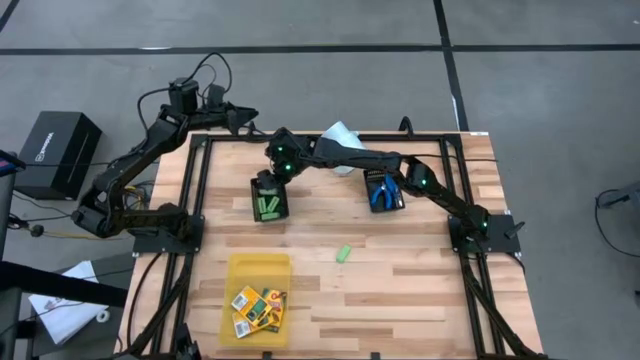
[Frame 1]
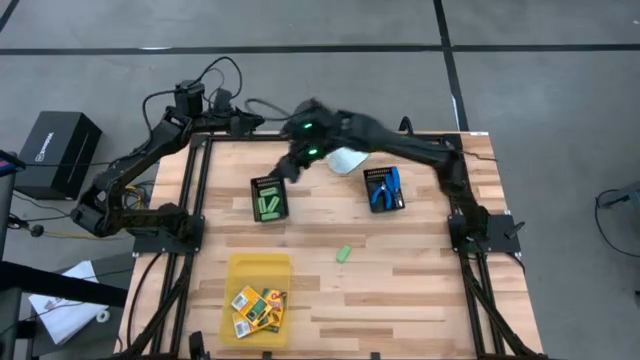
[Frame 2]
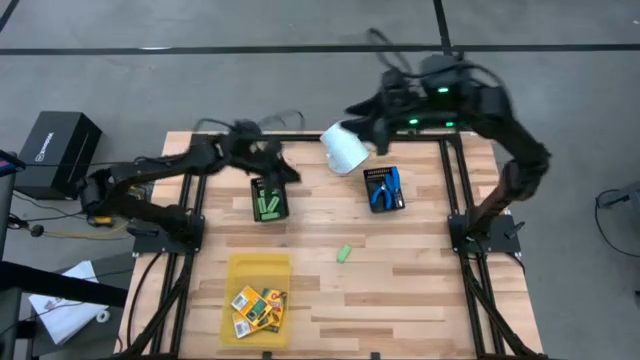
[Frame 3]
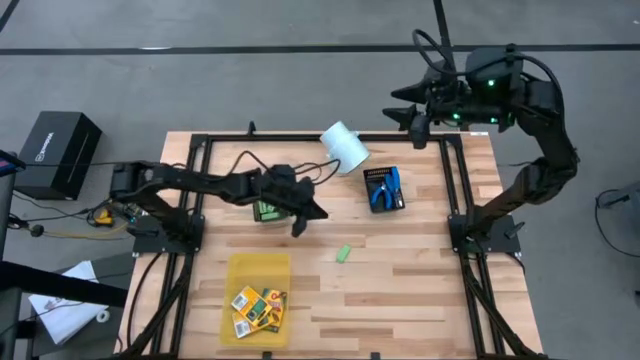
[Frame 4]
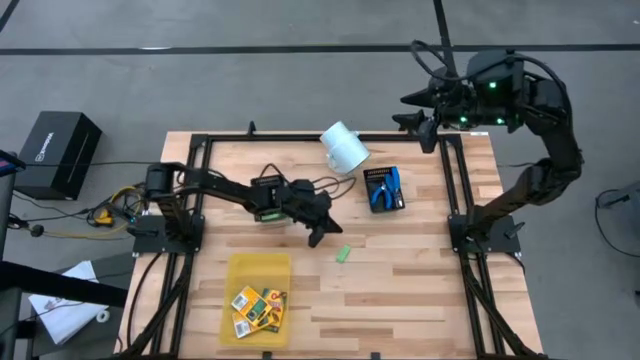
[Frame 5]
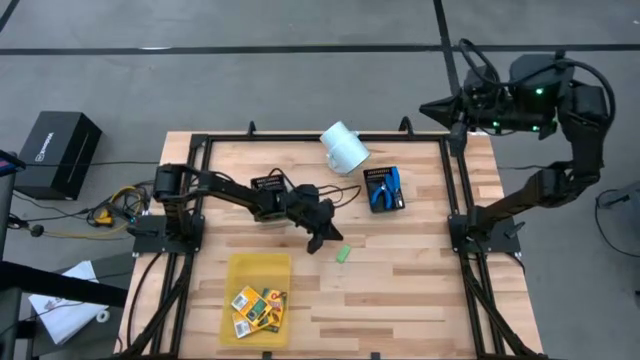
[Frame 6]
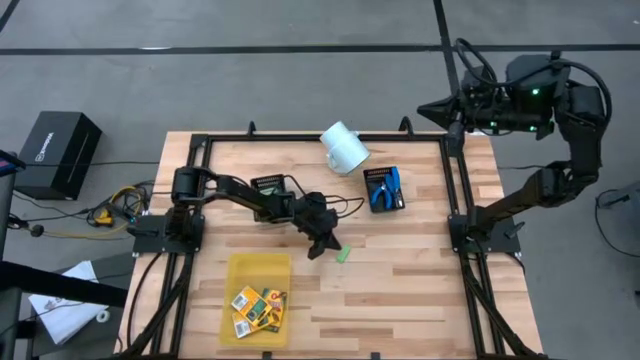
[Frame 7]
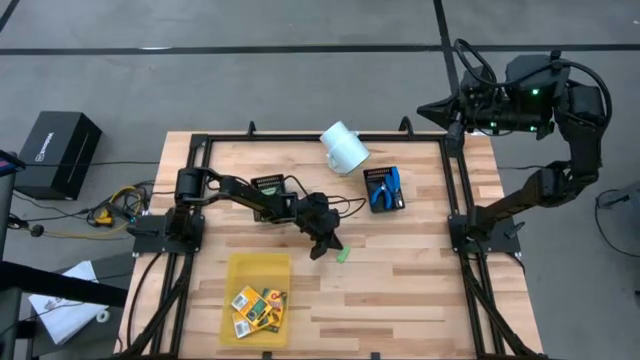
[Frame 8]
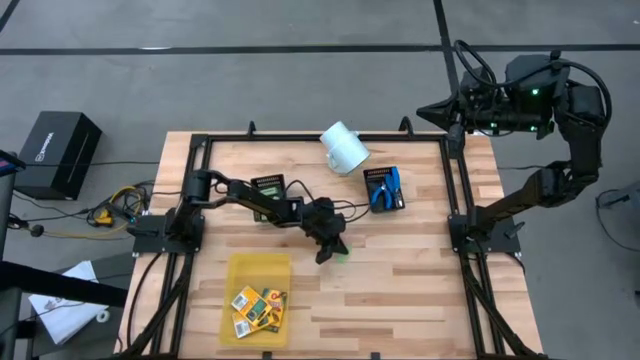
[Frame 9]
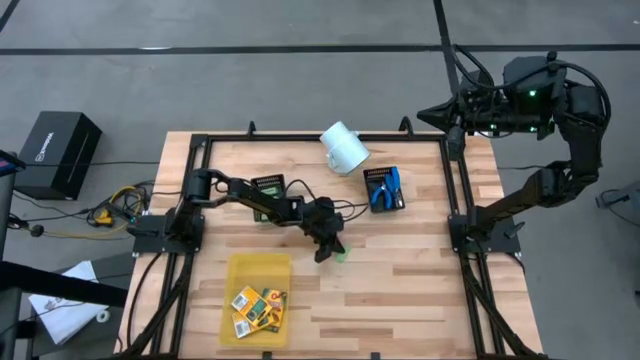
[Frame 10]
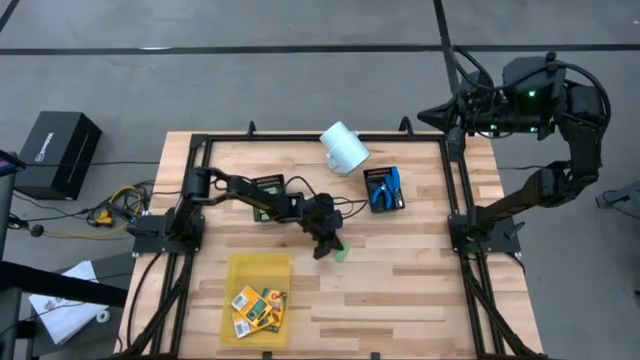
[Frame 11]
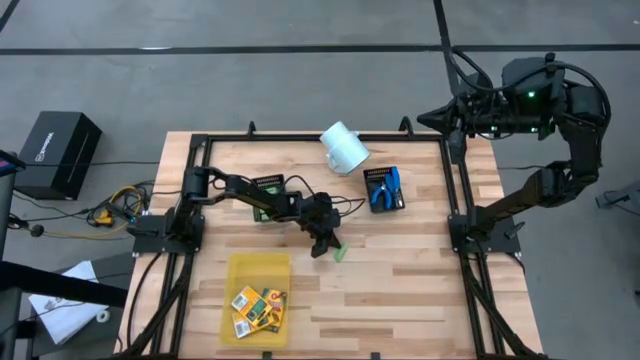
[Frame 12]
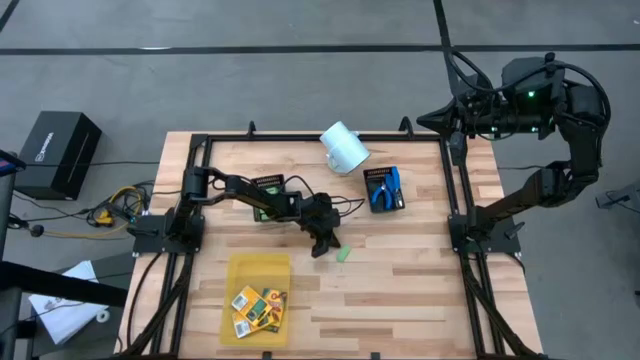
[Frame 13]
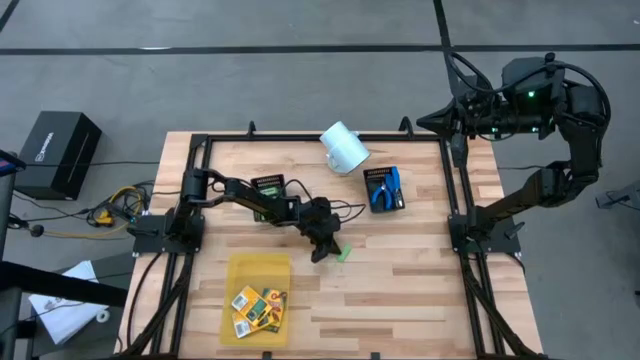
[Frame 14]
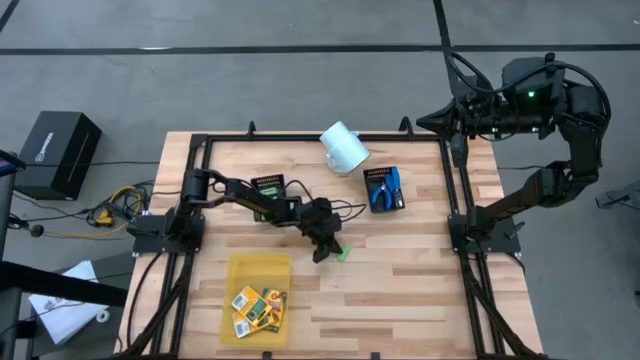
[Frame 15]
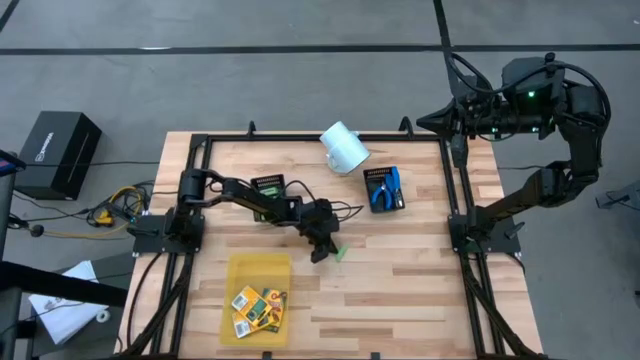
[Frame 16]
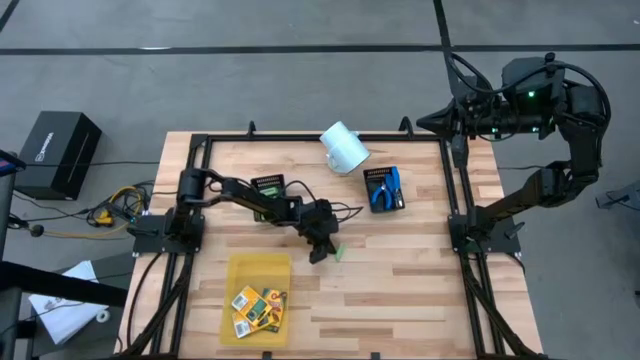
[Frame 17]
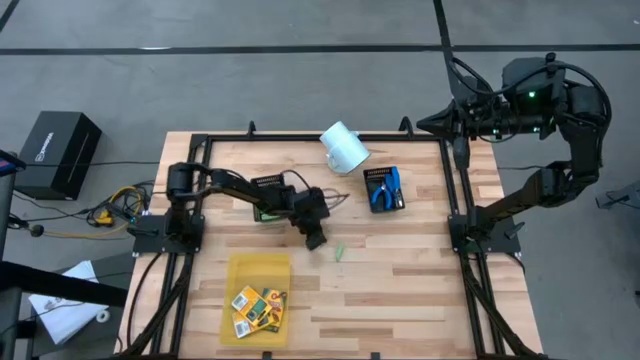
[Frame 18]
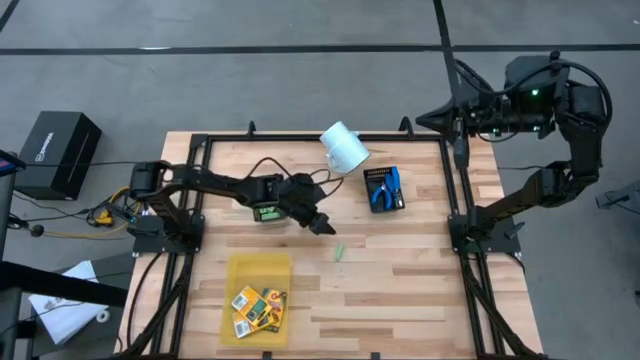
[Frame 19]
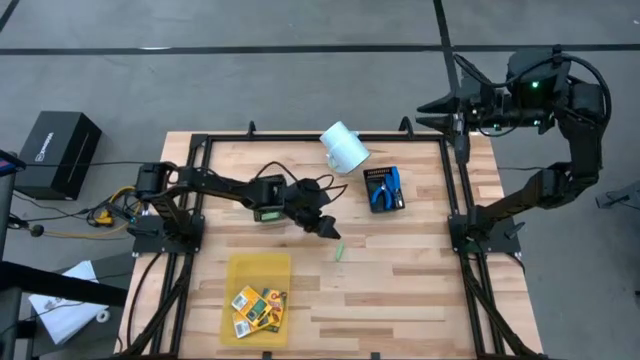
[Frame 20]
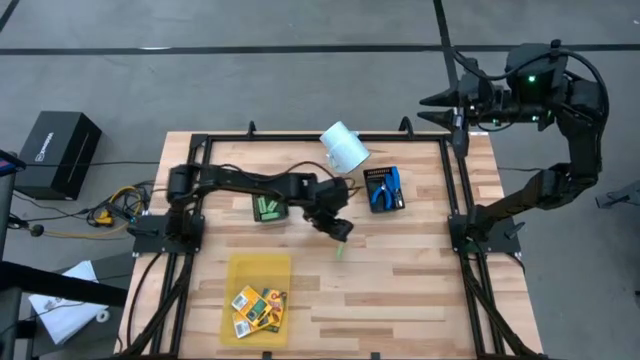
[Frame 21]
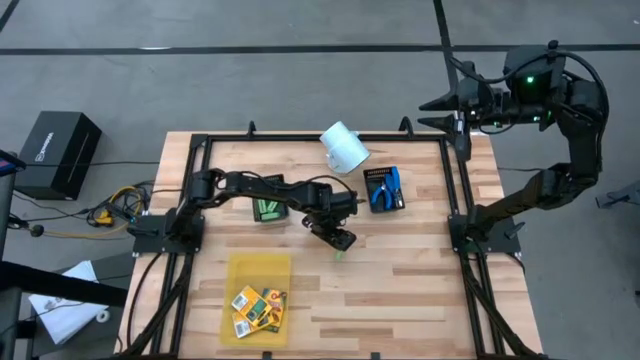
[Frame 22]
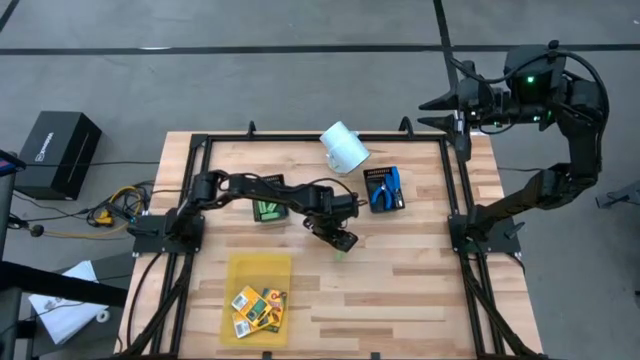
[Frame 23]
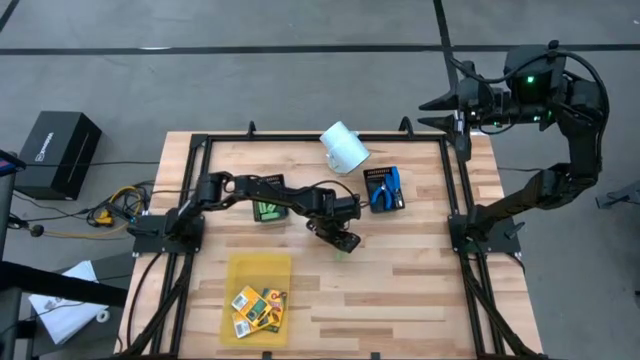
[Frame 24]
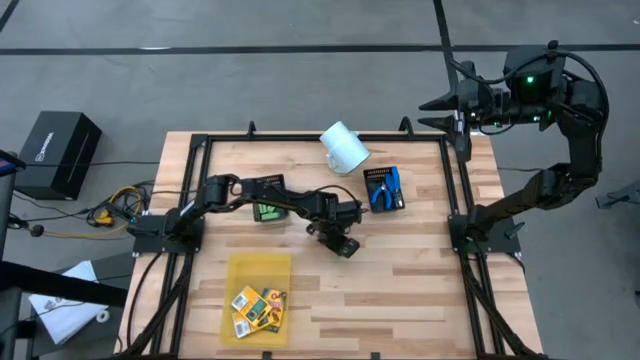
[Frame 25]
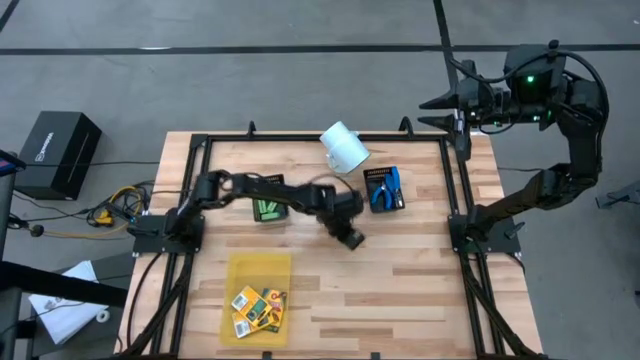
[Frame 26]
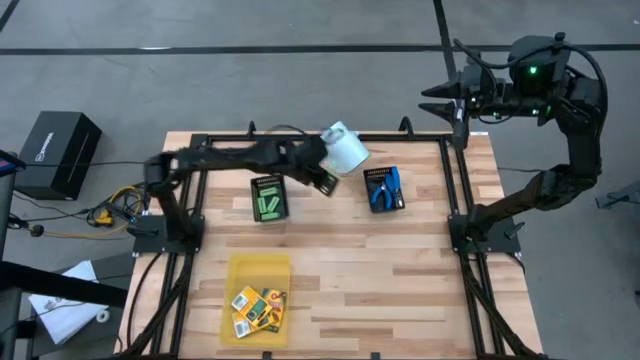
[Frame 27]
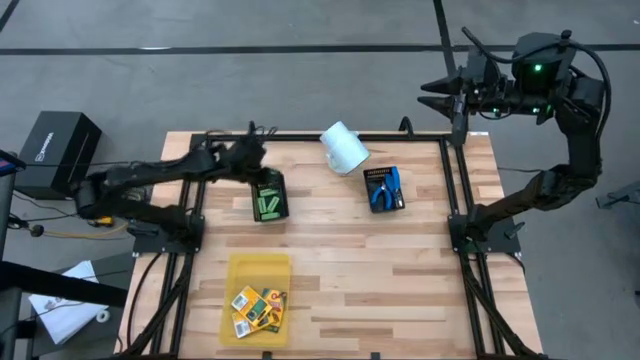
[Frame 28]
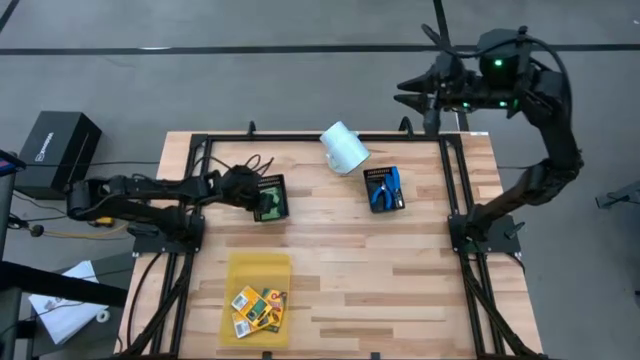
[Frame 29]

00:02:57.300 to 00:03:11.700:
Task: Pick & Place School Supplies
Put the green eraser into the left black bin

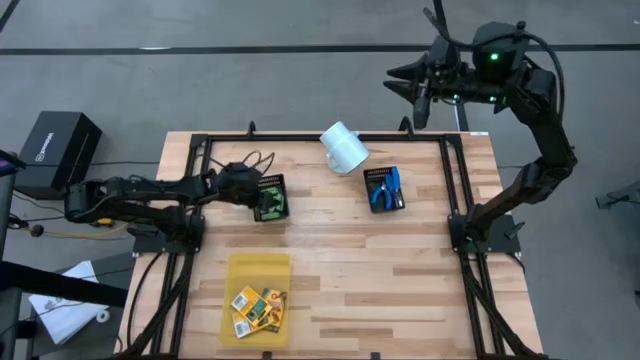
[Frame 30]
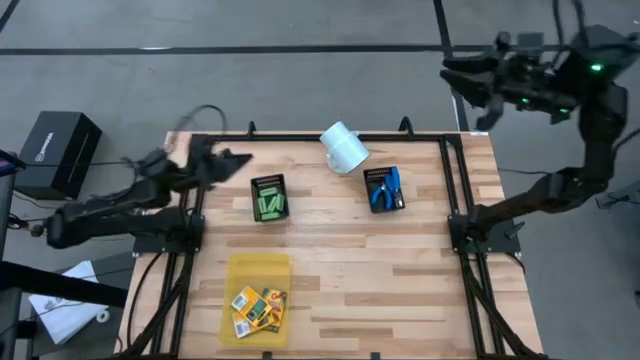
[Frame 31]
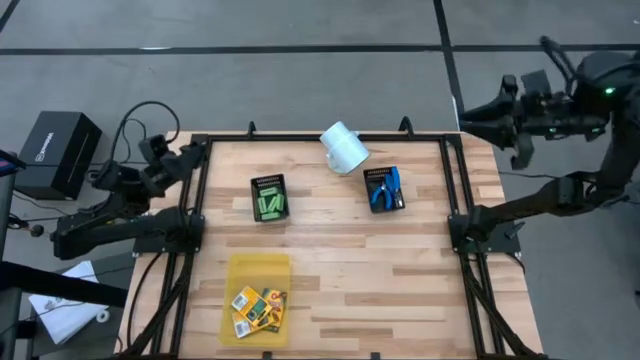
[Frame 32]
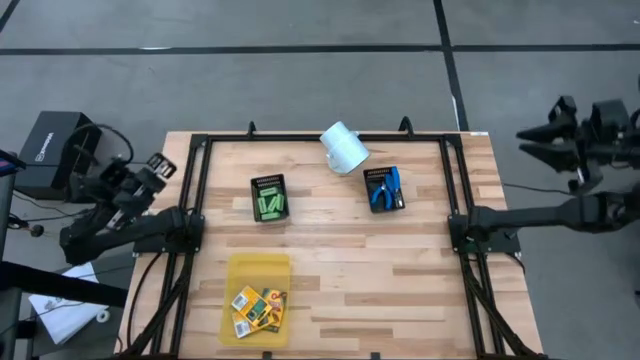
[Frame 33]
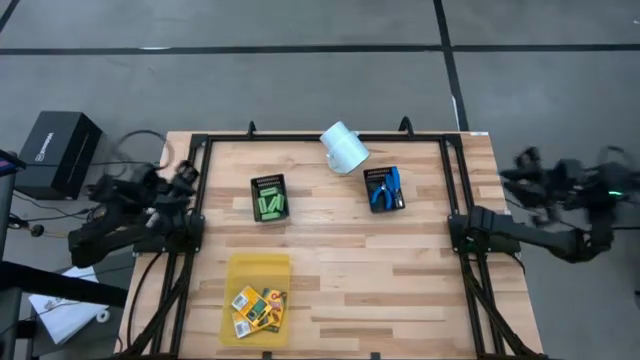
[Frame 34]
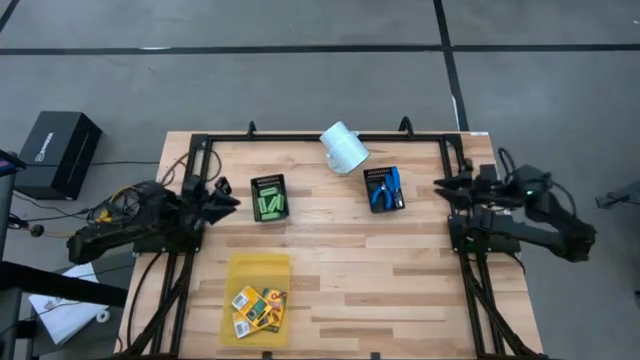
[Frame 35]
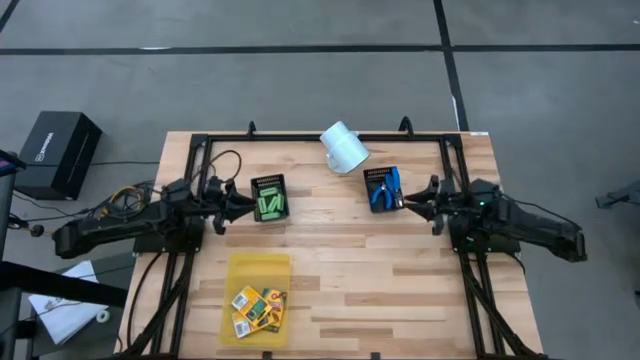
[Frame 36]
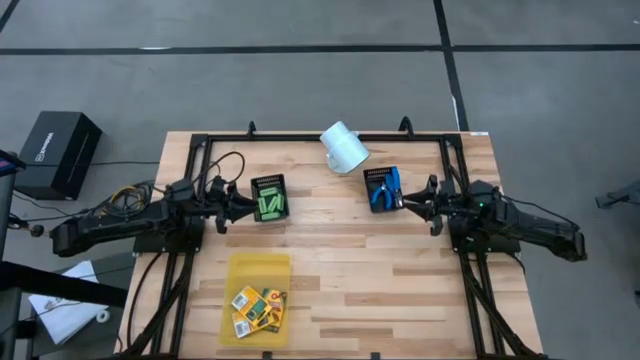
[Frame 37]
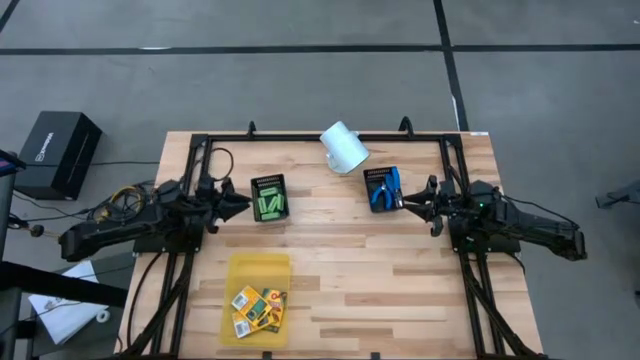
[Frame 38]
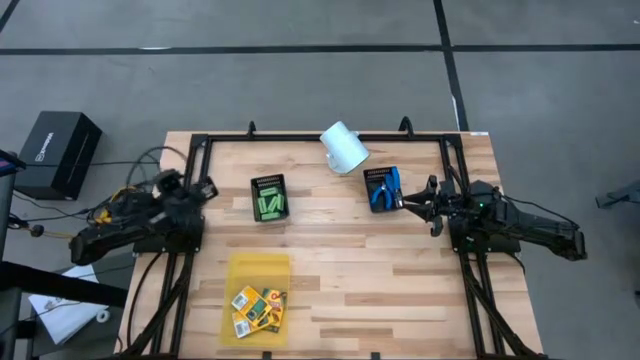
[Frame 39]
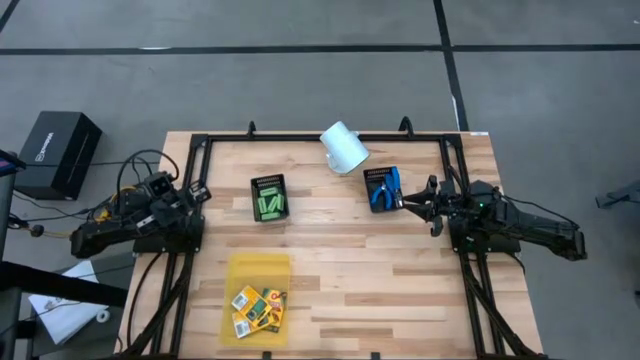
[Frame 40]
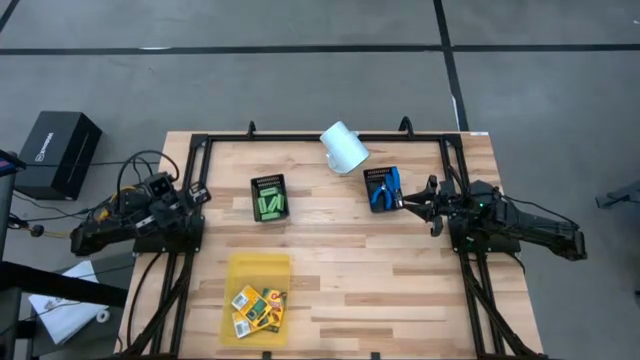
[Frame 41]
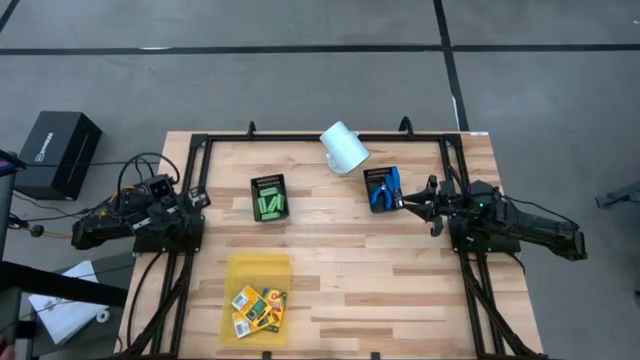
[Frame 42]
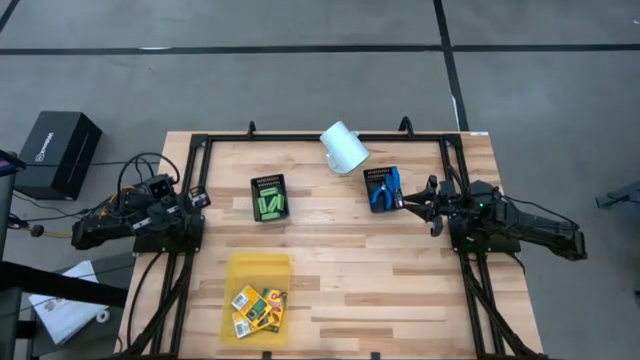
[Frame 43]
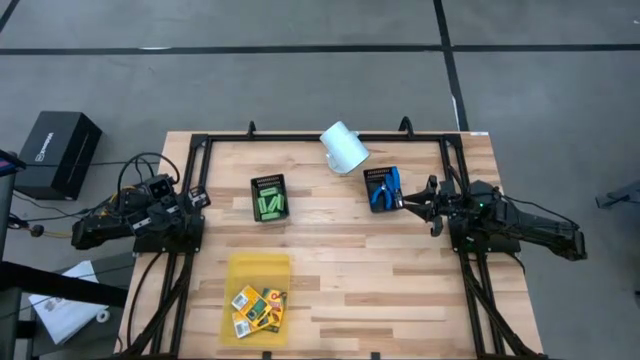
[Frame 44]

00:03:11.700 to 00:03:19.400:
Return to Home Position
